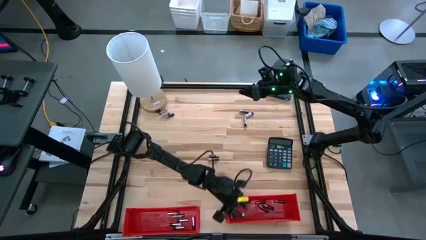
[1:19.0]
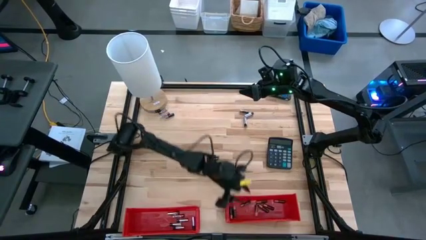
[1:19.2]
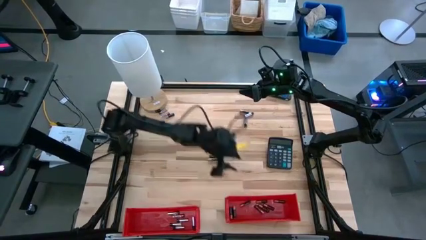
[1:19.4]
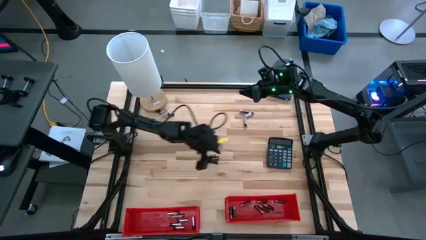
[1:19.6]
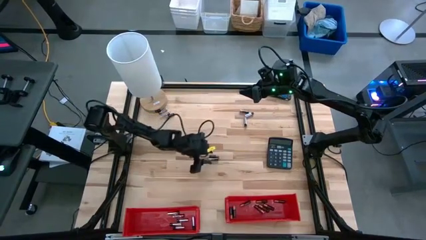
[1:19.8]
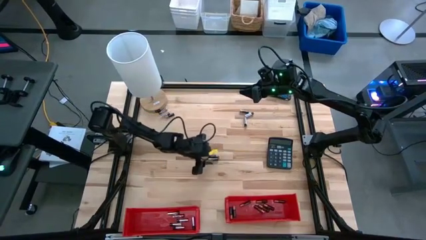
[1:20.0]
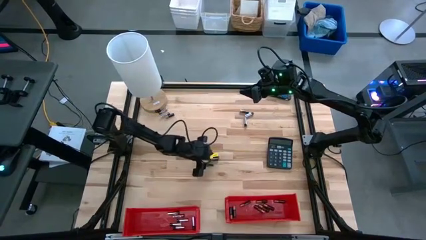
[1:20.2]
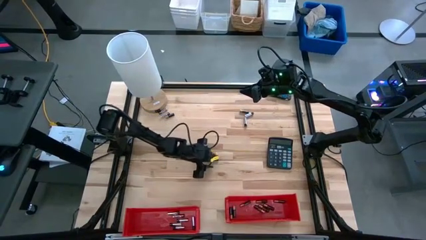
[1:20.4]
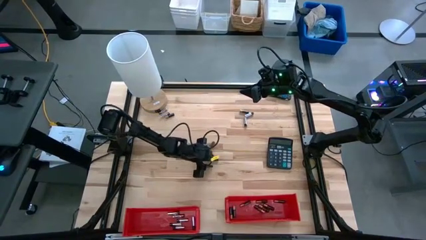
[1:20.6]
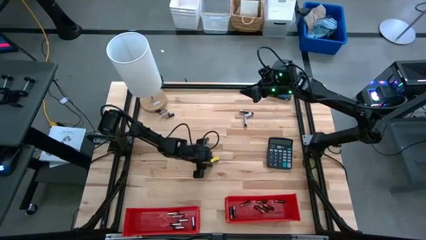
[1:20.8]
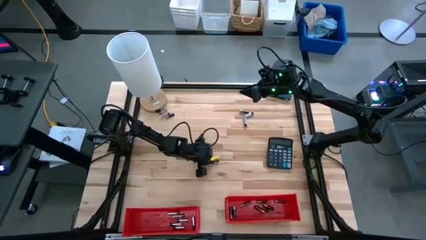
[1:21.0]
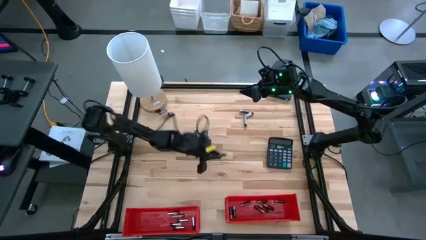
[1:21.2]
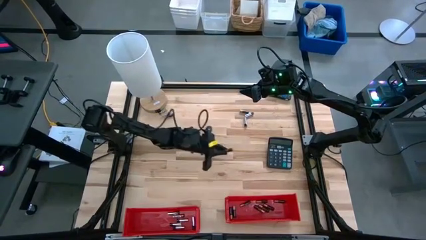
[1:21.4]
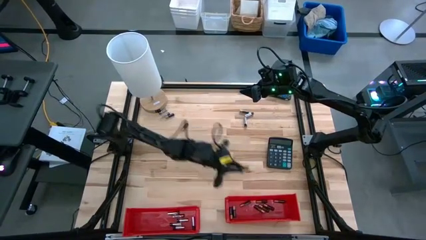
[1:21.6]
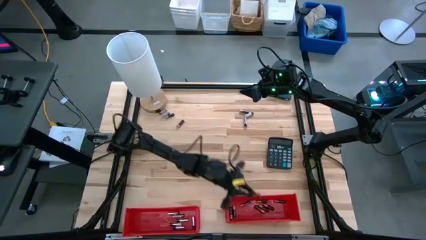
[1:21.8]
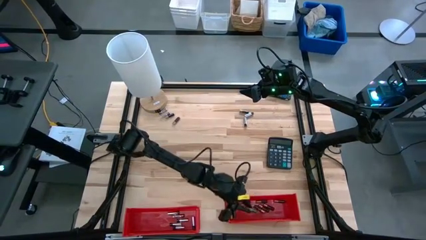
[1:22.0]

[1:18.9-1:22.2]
Task: Sort batteries
Put the black-brown battery into the right red bin

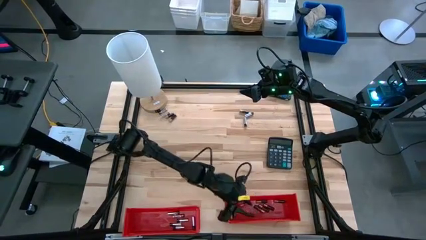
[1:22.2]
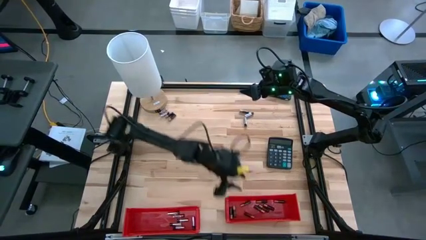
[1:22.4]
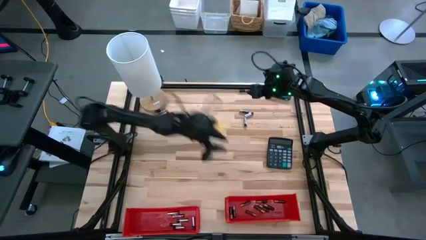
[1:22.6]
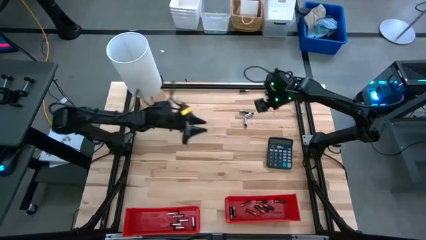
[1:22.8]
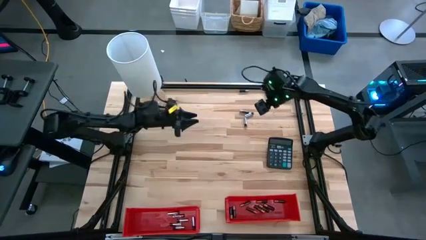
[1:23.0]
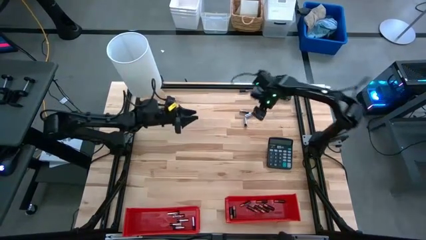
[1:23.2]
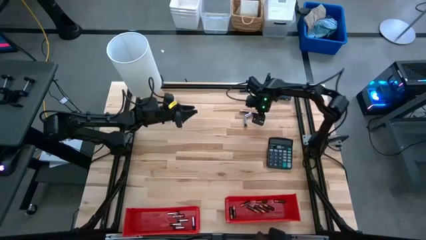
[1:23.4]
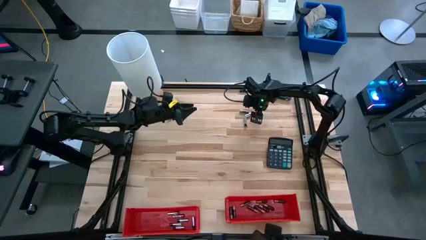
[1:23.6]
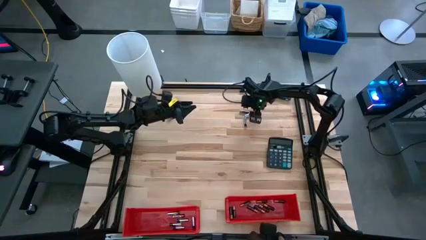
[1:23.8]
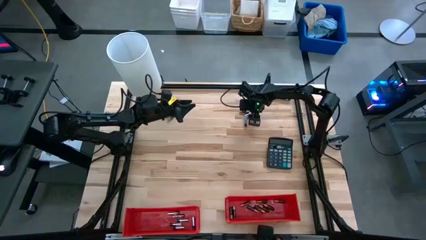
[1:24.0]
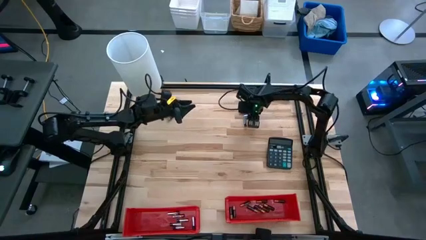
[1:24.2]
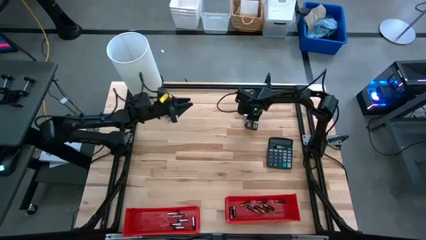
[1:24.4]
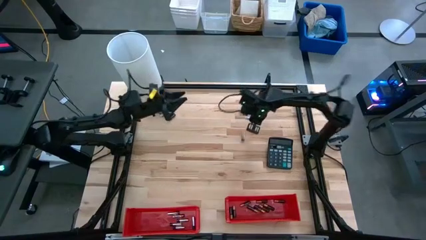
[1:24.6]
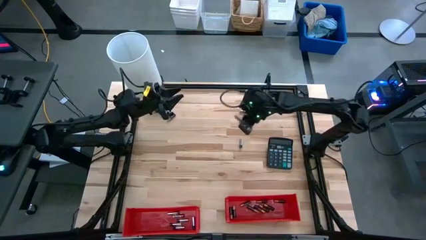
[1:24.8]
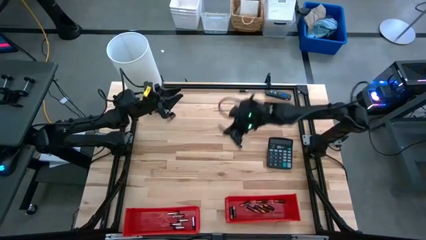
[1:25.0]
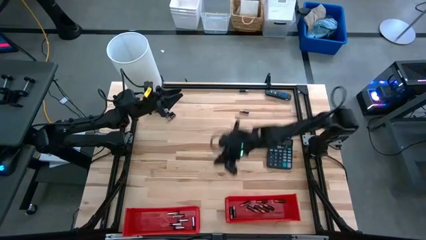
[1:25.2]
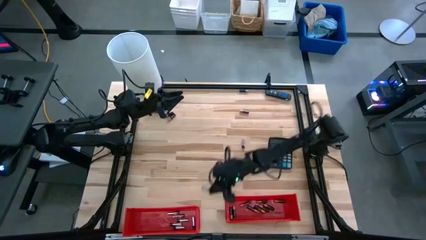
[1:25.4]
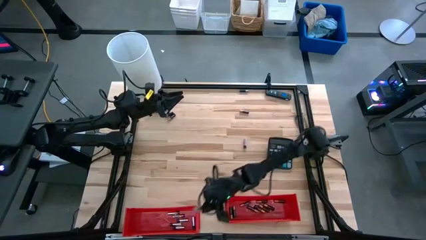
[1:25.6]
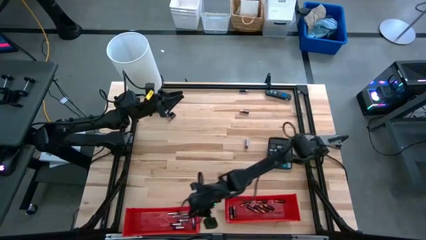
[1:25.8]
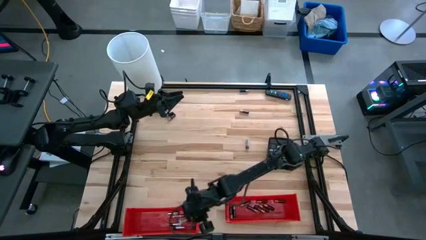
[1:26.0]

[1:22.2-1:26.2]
Put the silver battery into the left red bin

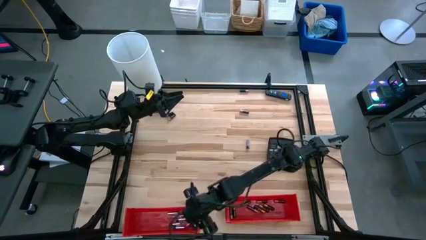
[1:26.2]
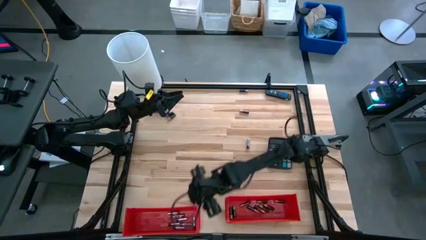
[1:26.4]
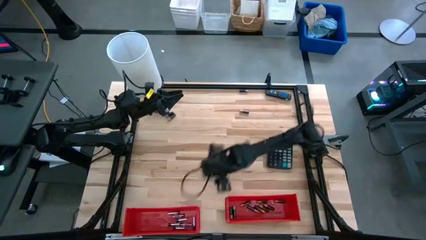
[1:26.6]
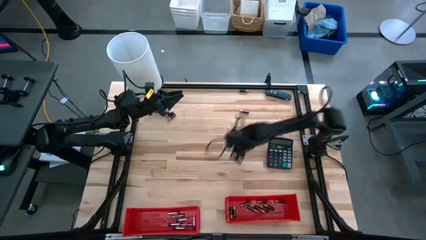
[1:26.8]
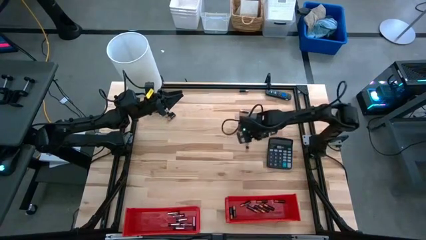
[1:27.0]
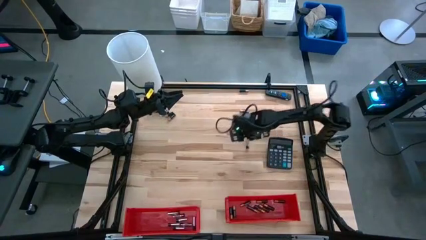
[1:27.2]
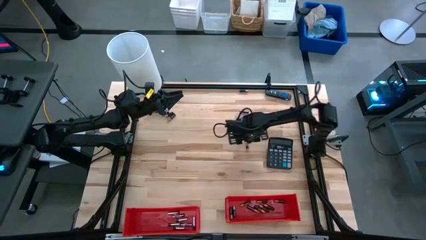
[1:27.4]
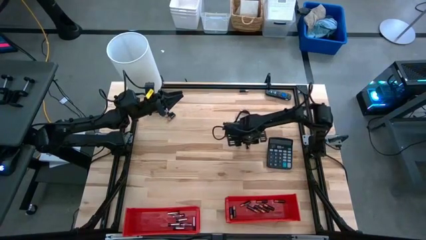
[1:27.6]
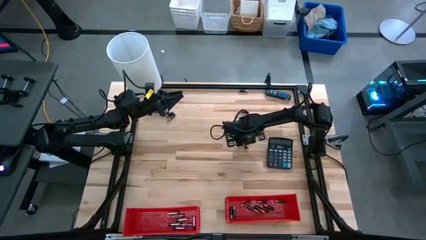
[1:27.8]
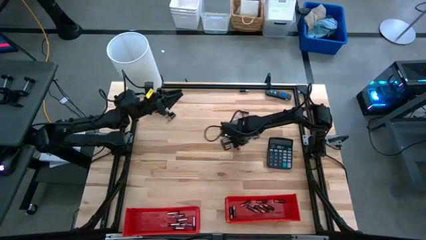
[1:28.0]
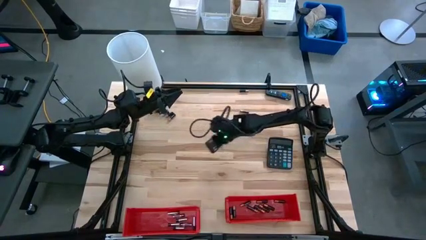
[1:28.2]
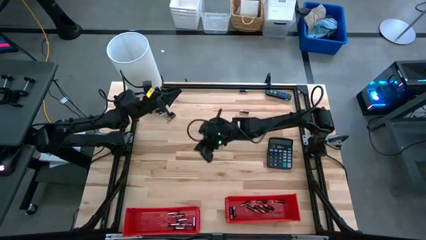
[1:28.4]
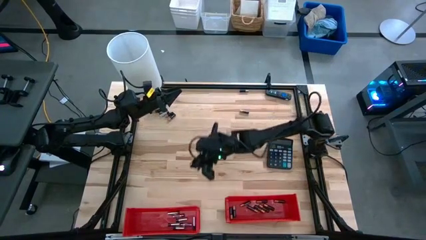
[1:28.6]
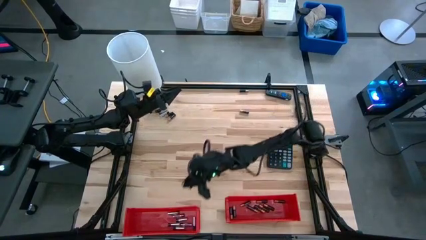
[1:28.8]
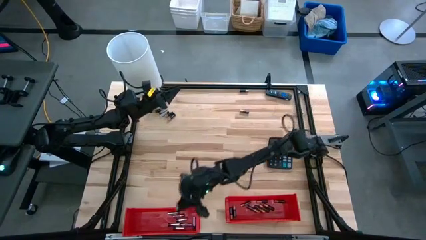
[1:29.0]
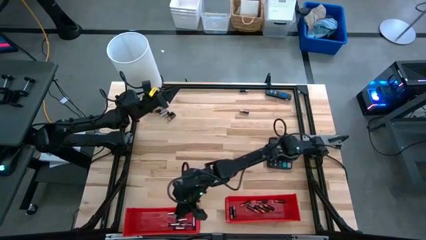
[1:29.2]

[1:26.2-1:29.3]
Put the silver battery into the left red bin

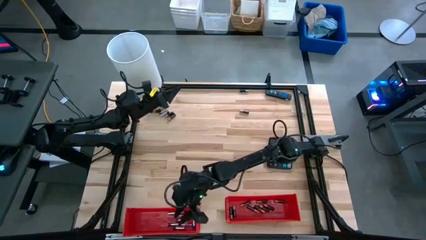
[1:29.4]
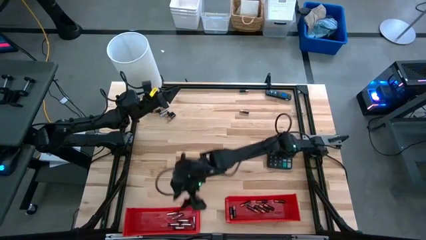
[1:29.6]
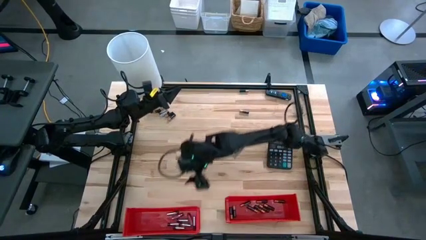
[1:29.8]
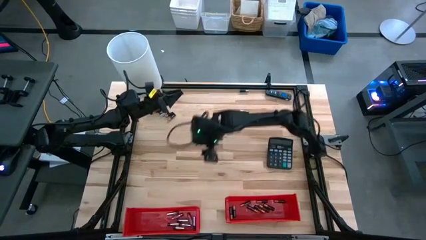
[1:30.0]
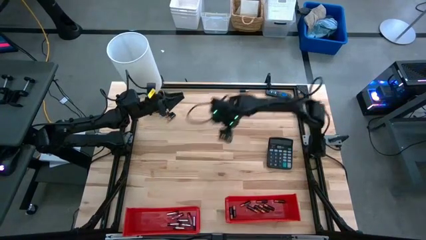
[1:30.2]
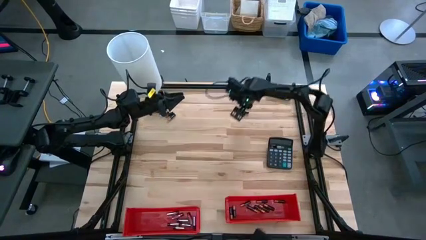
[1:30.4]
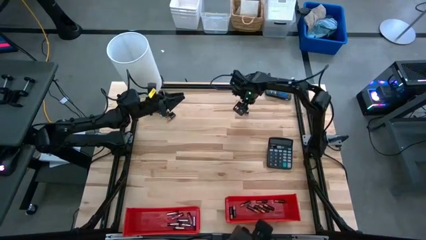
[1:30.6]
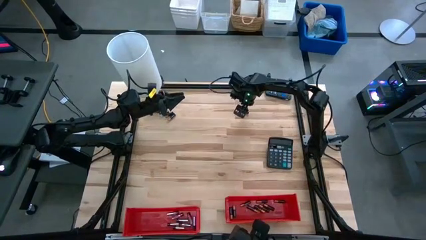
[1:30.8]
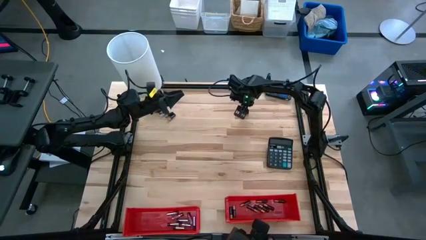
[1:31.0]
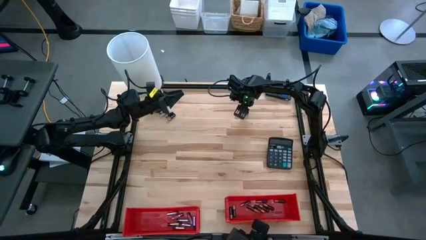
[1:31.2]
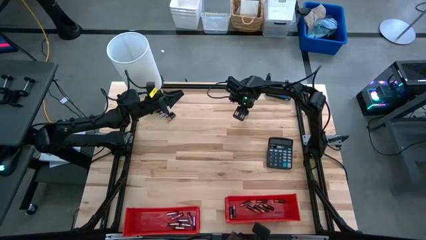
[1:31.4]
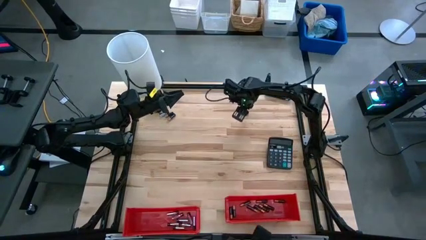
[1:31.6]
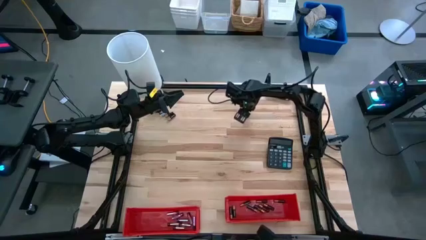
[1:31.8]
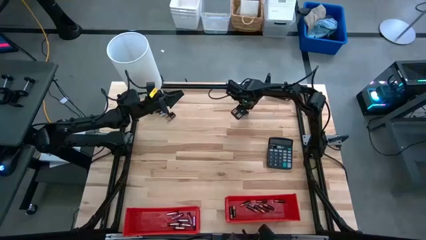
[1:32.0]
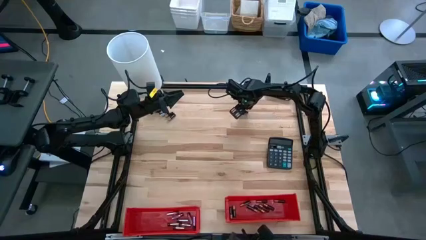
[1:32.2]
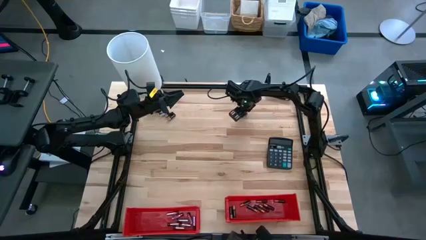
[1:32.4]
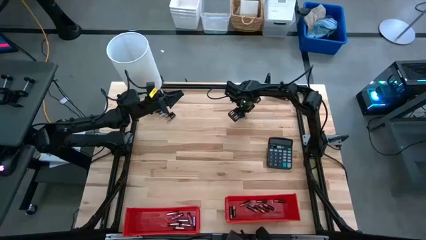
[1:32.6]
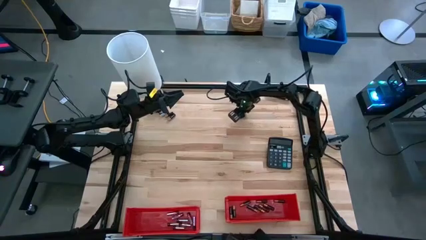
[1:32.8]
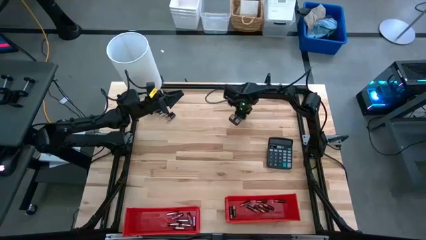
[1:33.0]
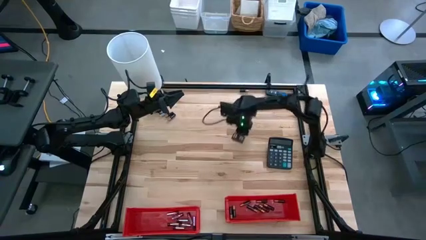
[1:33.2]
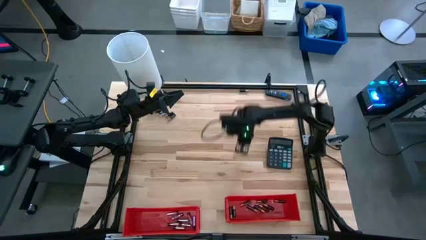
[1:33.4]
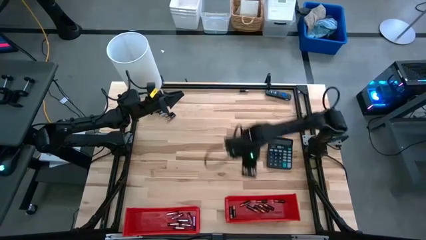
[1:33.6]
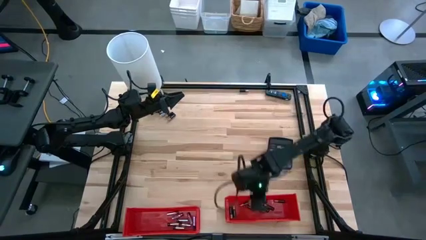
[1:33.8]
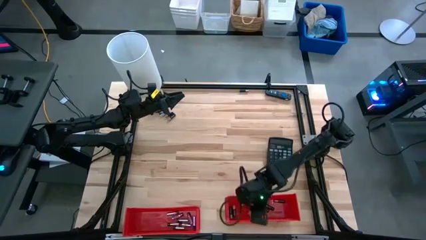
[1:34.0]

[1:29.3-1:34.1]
Put the black-brown battery into the right red bin

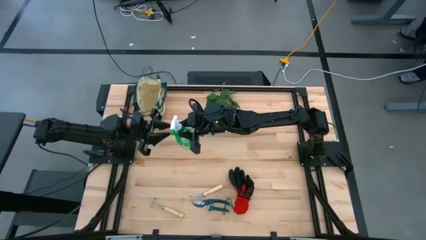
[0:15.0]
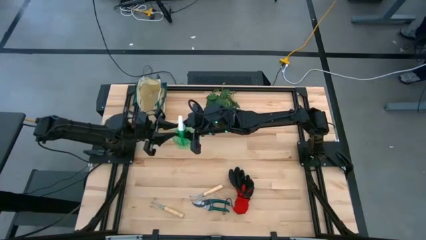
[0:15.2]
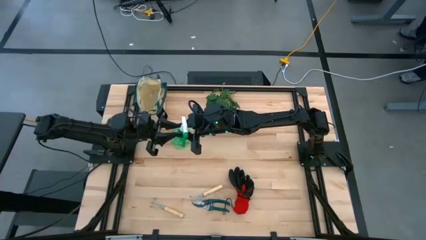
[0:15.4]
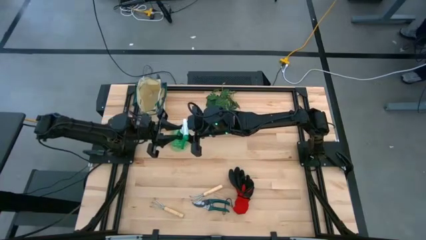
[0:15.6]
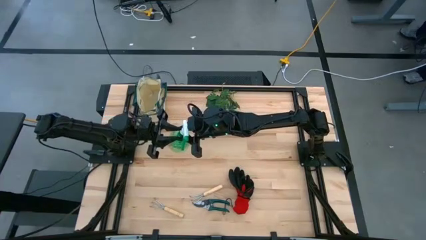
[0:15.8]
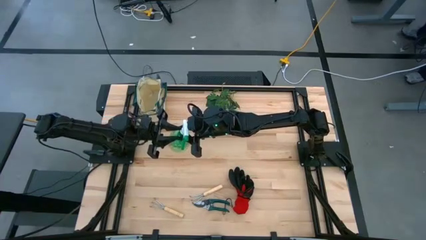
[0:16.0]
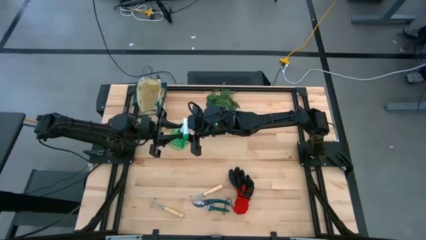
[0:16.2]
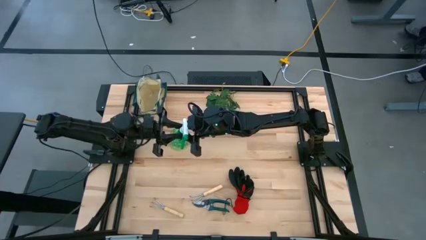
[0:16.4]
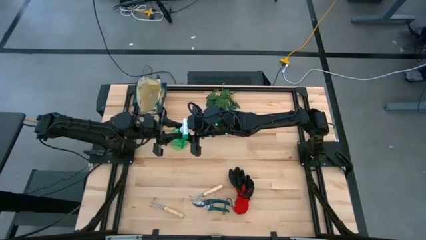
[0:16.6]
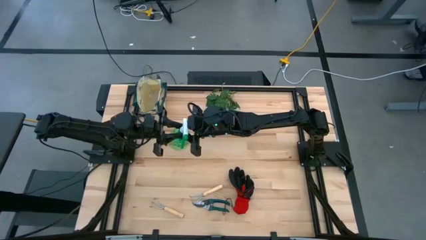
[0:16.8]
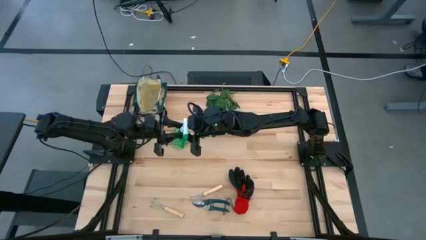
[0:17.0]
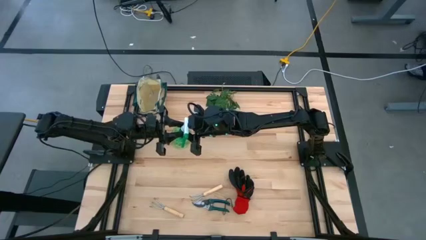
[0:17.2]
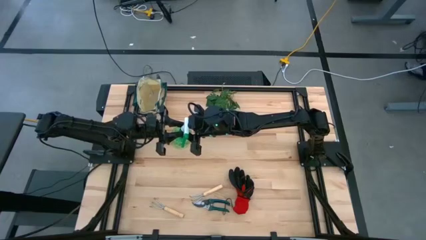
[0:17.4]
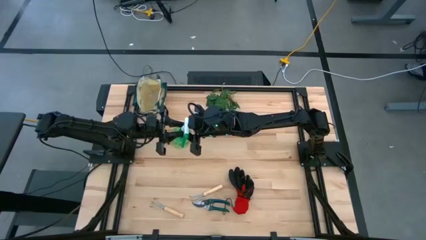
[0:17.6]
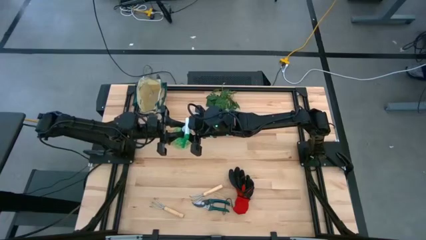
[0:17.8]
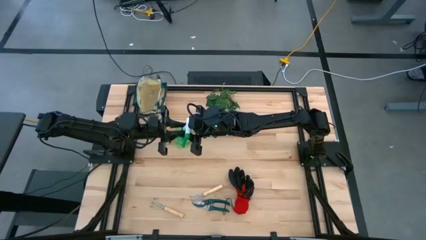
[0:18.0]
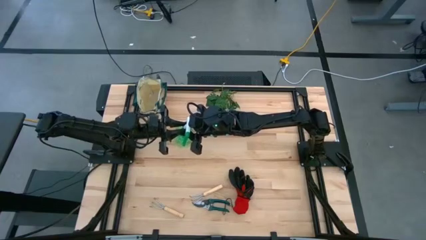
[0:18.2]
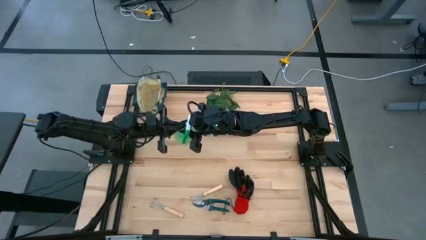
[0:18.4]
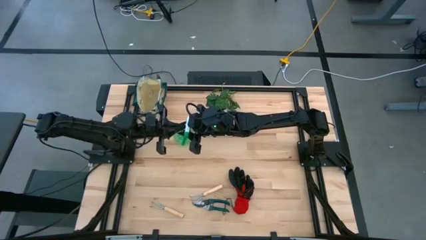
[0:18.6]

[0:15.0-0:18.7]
Task: Pick & Place Garden tools in Gardening bag
Put the green spray bottle into the green gardening bag
